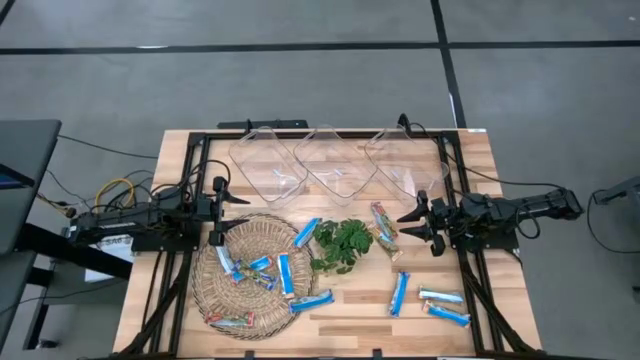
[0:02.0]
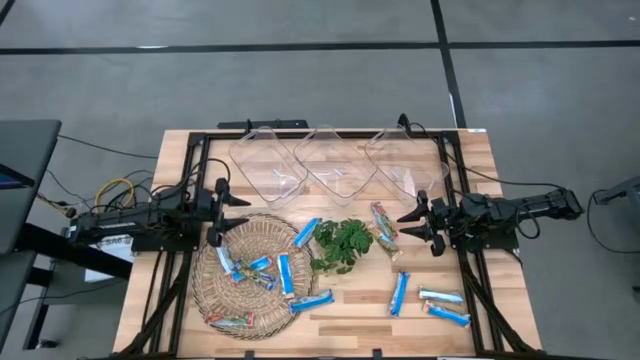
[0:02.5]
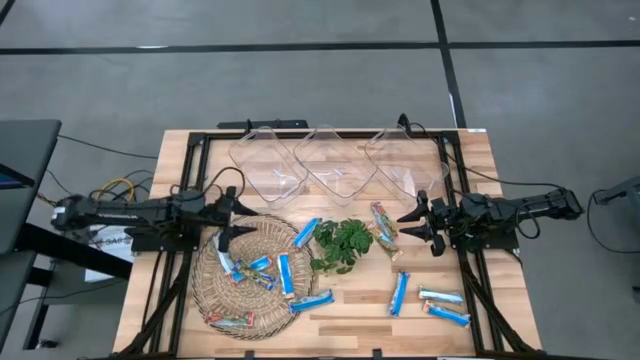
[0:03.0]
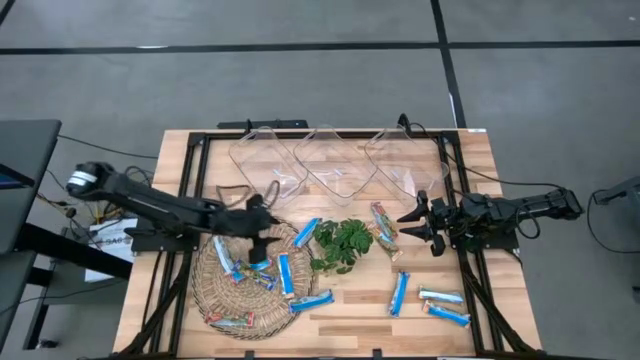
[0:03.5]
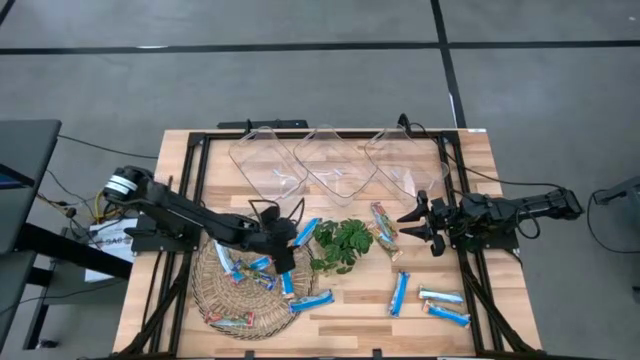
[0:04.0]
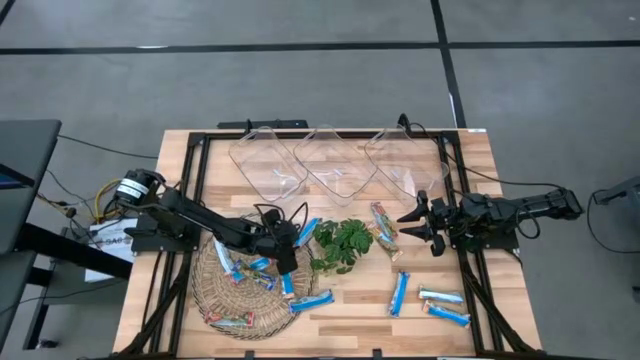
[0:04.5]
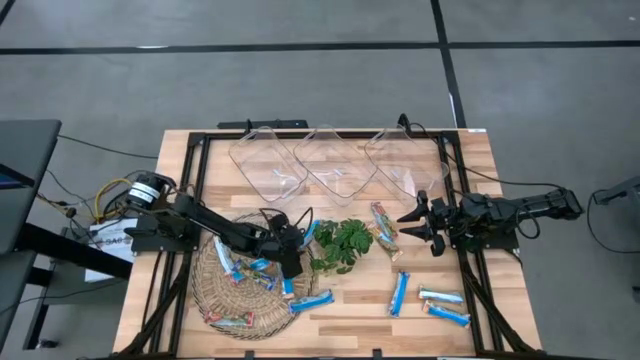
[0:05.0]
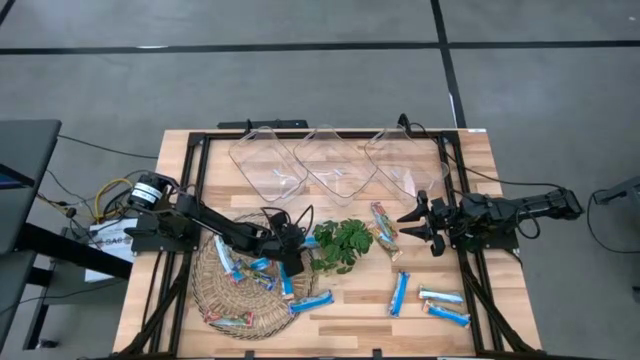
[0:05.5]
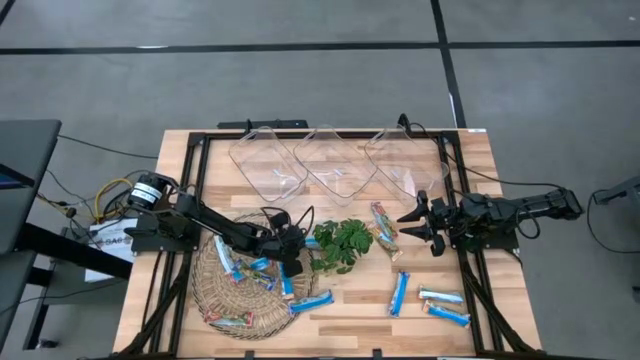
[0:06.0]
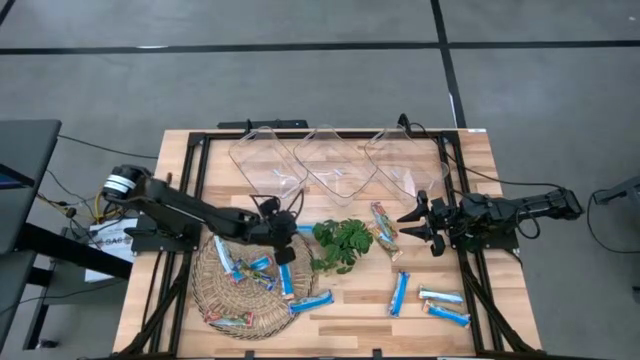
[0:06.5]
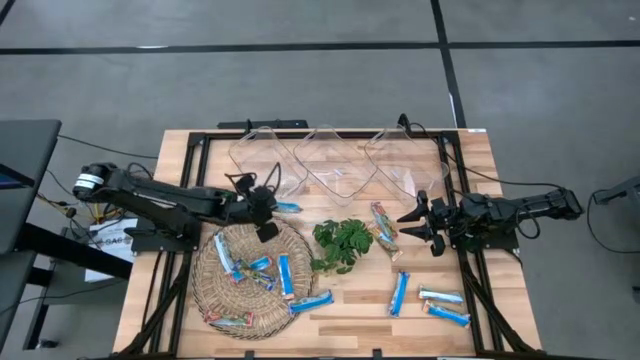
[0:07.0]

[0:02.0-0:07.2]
Task: Pick and place Granola Bars by type
Put the red granola bar into the left transparent bin

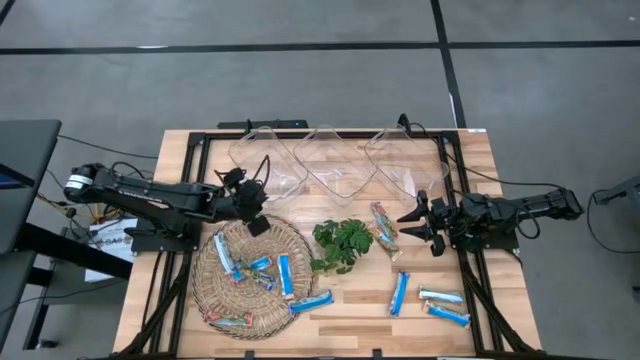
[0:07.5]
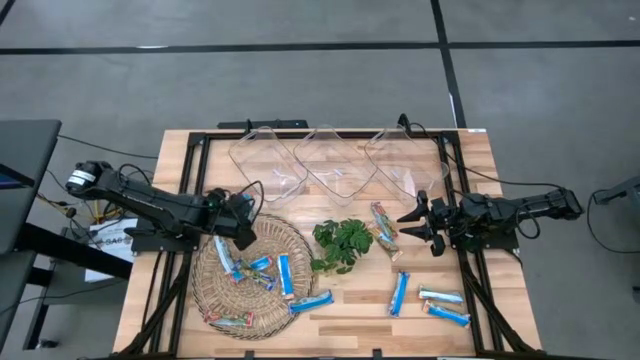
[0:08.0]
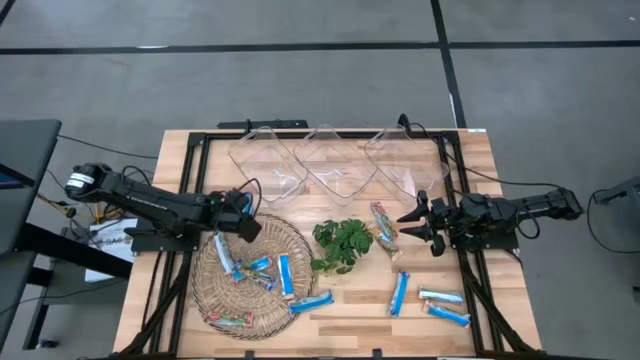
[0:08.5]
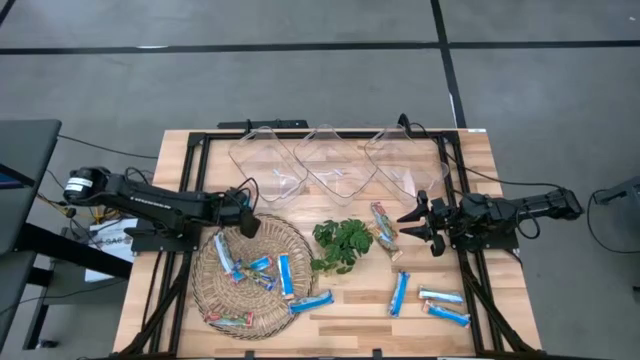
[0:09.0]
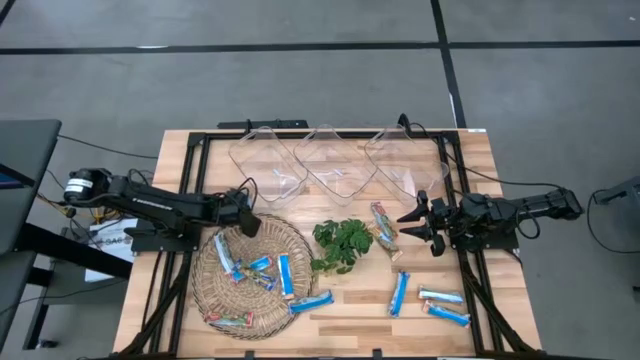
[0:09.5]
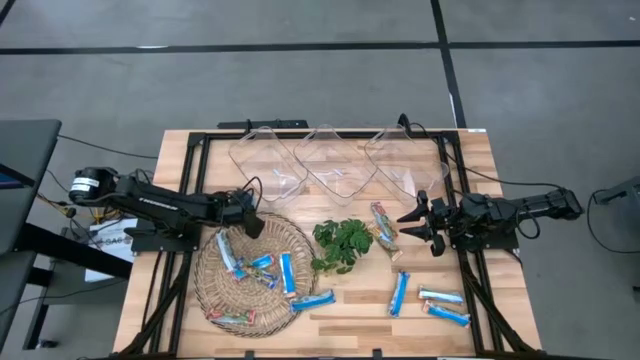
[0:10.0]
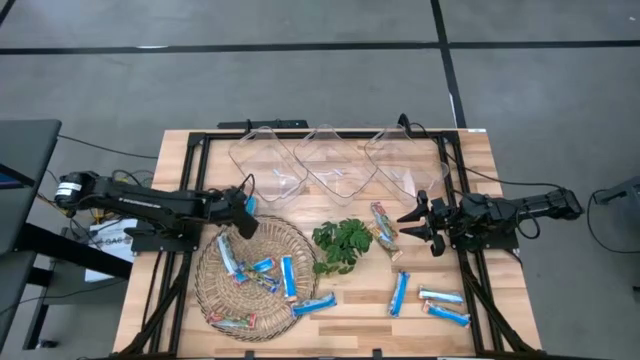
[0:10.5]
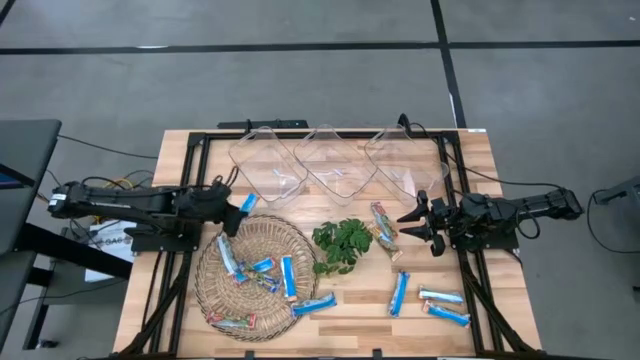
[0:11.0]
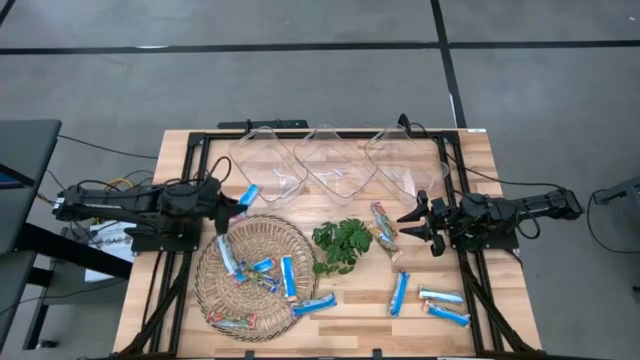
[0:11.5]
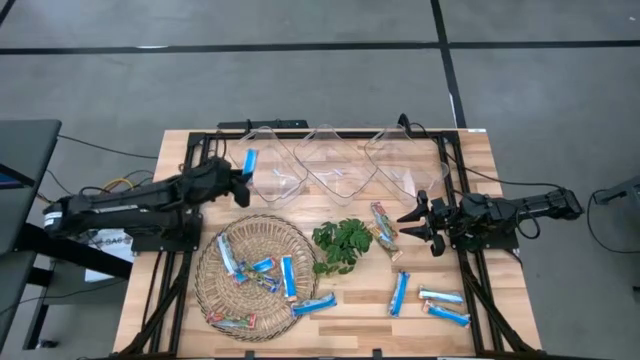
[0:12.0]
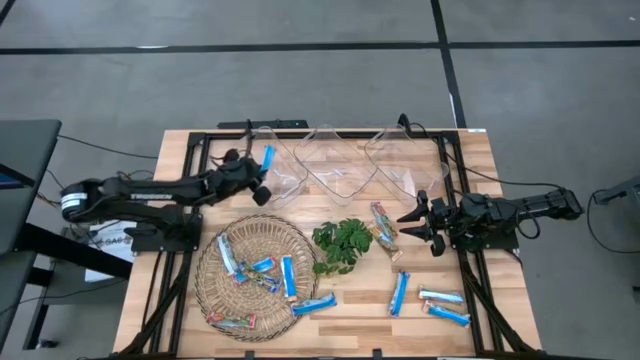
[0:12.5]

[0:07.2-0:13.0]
Put the red granola bar into the left transparent bin

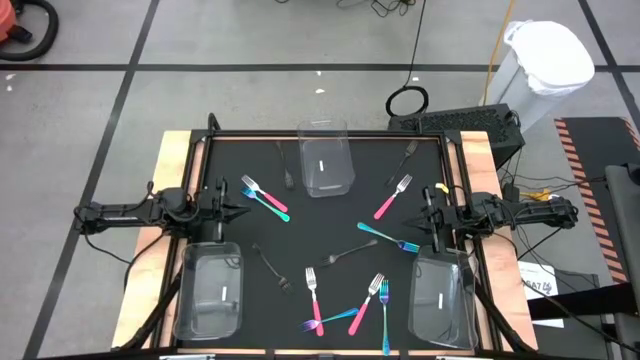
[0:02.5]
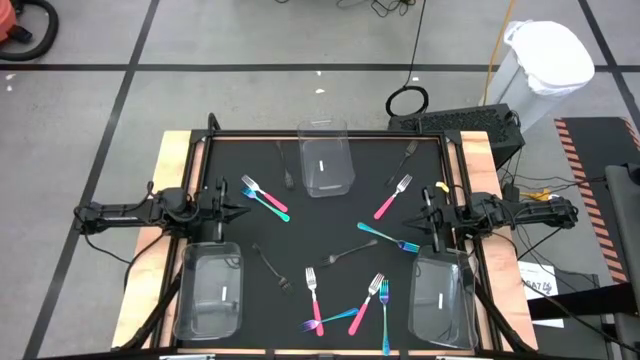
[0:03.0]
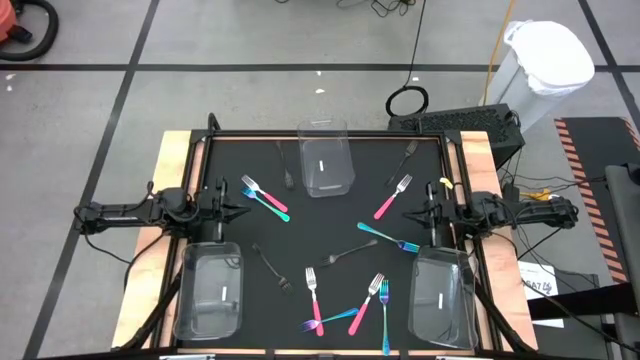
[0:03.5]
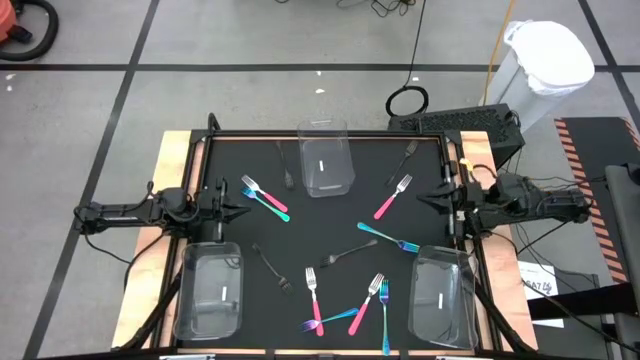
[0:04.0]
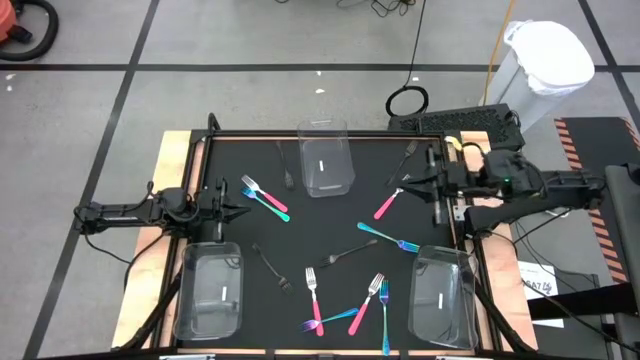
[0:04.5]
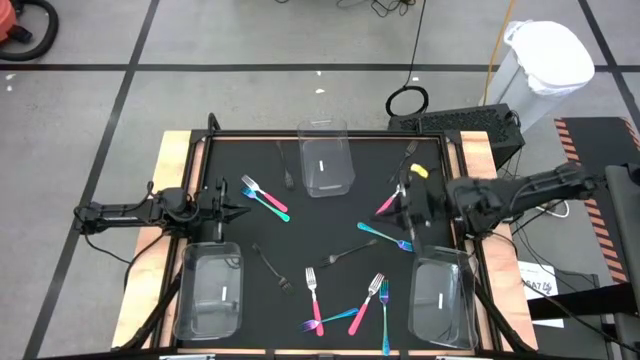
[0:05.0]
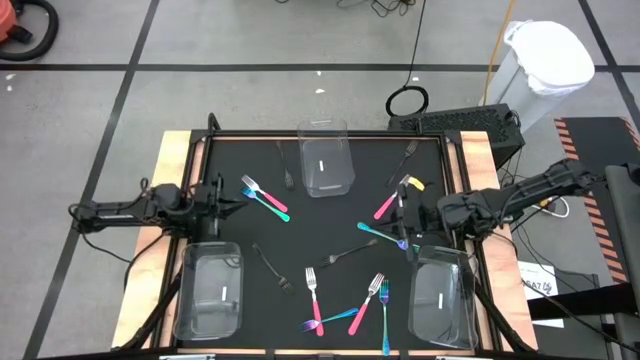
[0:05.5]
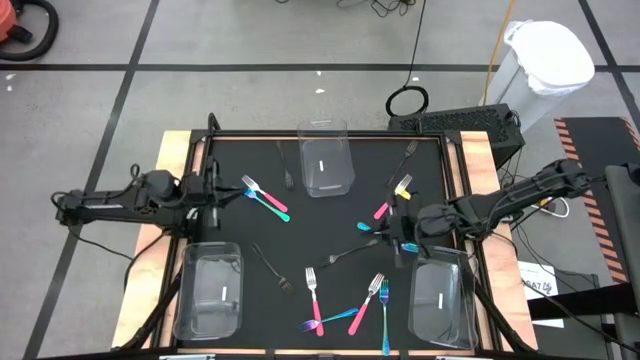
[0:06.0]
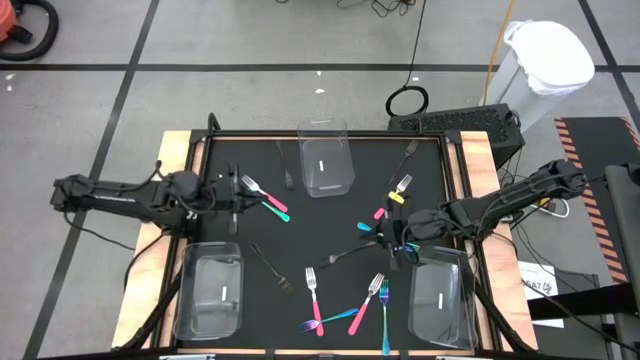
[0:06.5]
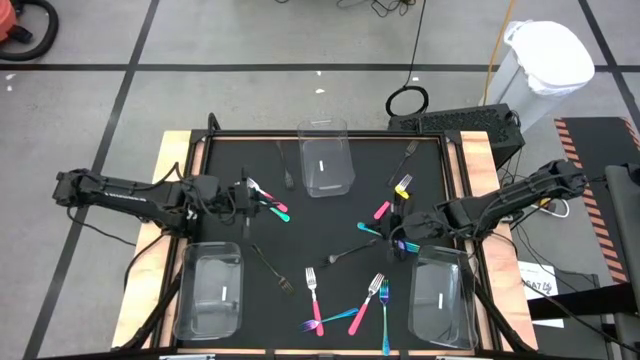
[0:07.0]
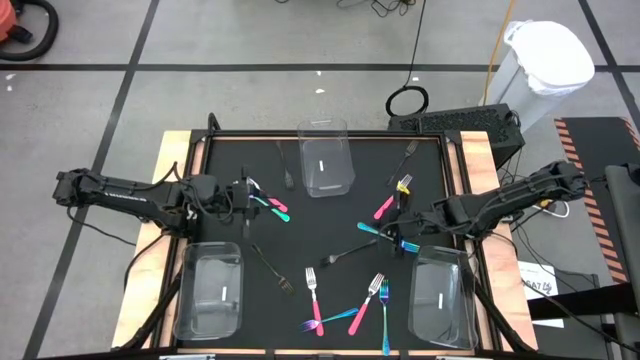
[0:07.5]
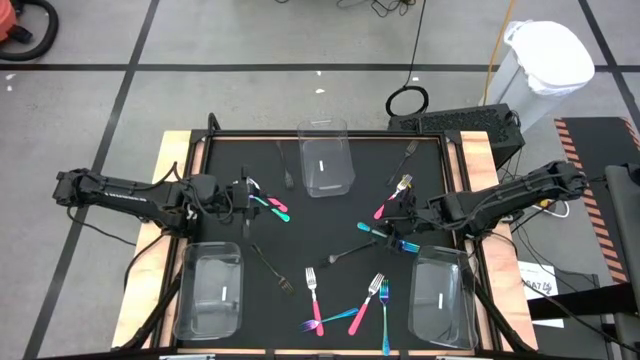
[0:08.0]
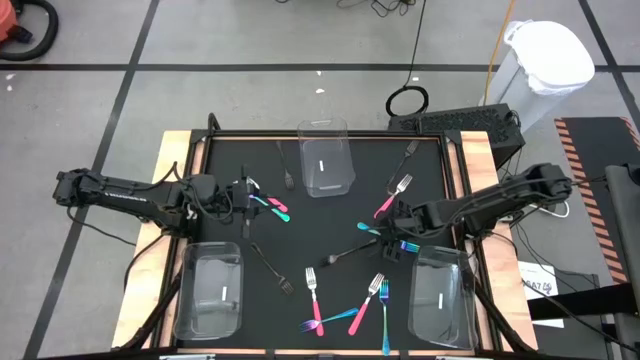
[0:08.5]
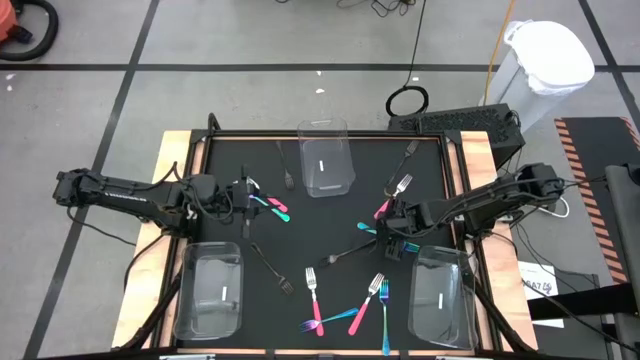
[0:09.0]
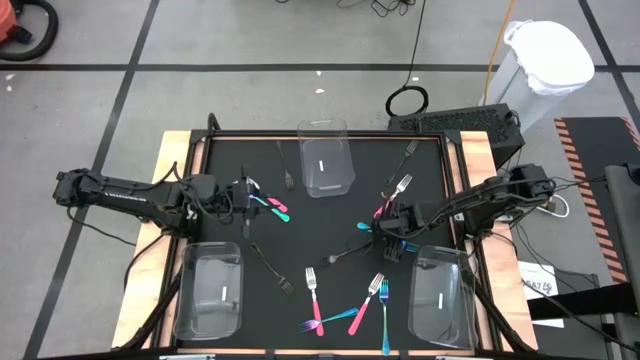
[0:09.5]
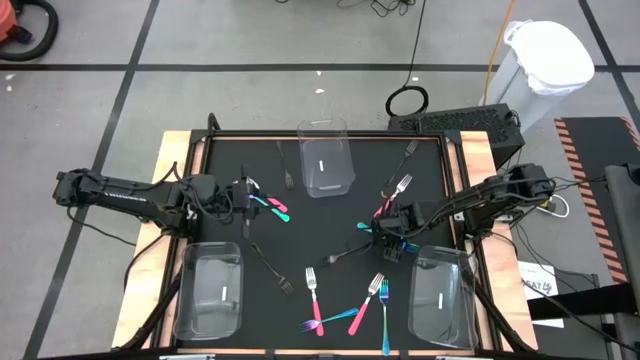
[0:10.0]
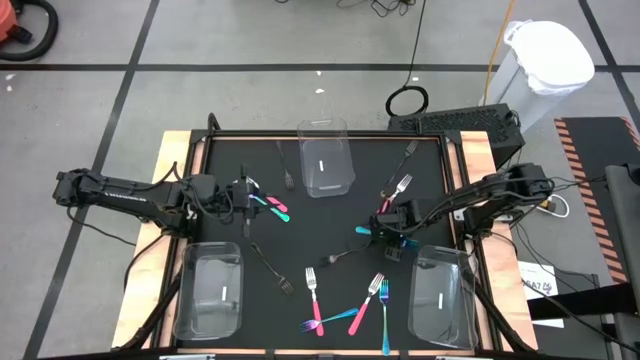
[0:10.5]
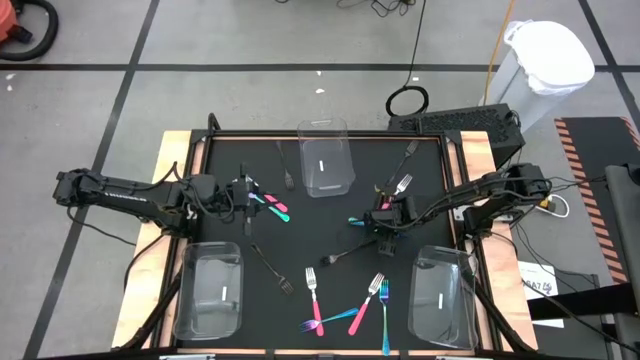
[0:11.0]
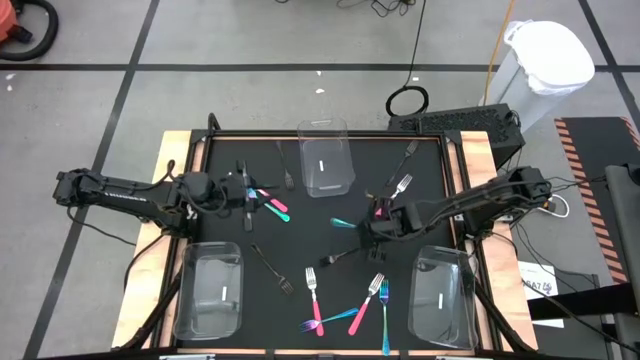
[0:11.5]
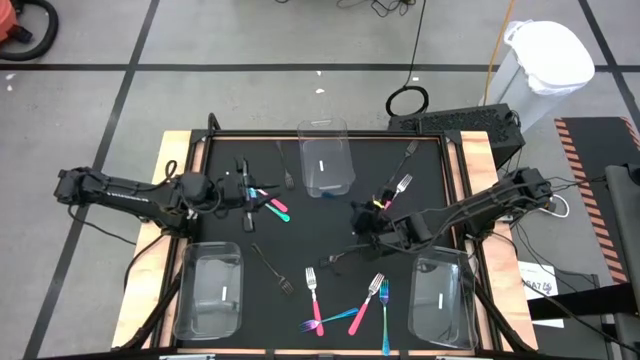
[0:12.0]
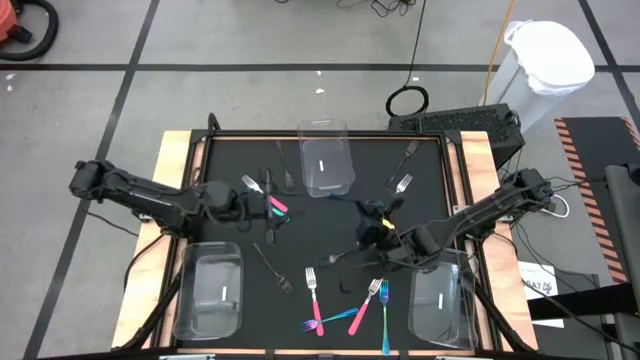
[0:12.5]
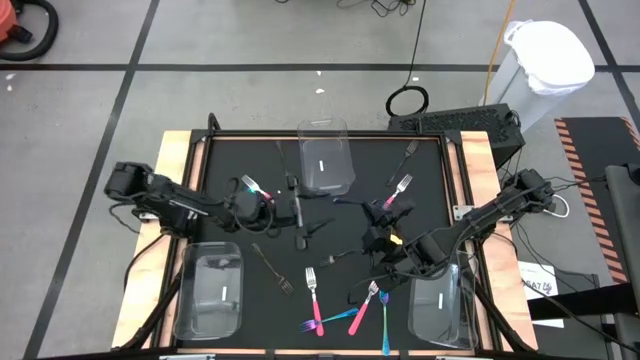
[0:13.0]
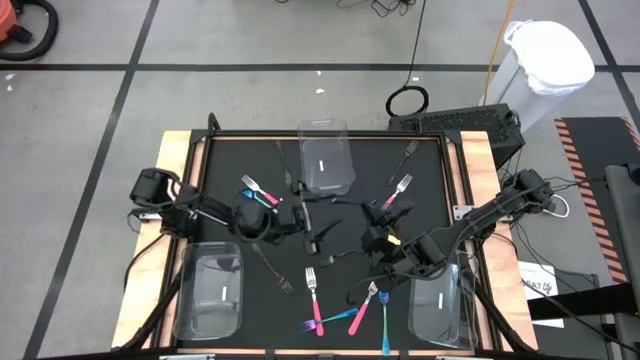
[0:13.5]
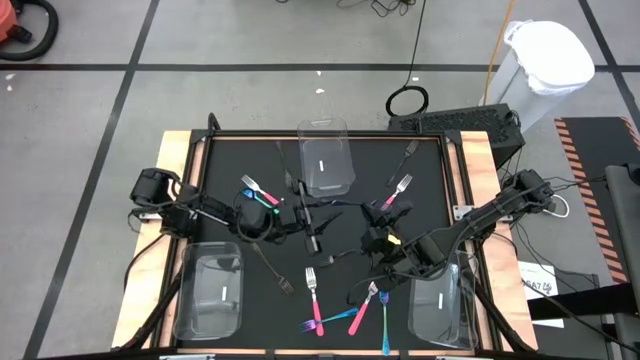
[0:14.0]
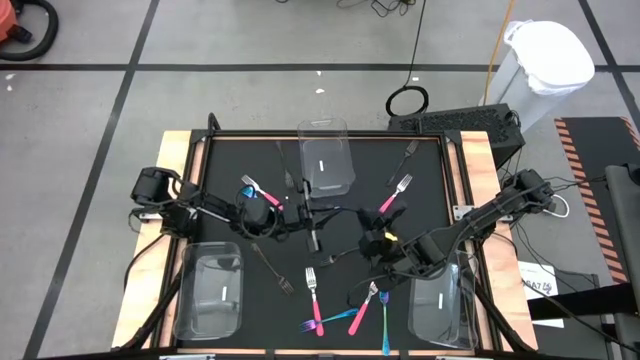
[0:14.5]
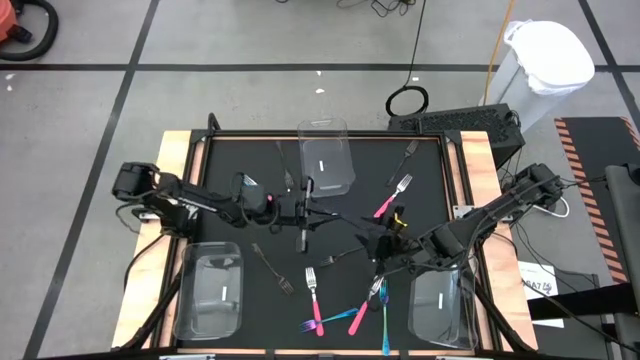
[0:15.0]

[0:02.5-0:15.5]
Task: Sort silverware by color (type)
Put the blue fork into the top transparent bin
